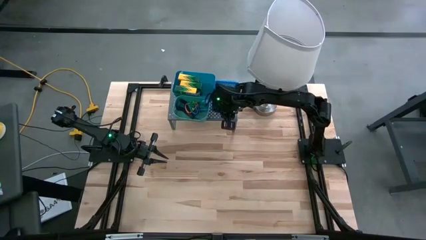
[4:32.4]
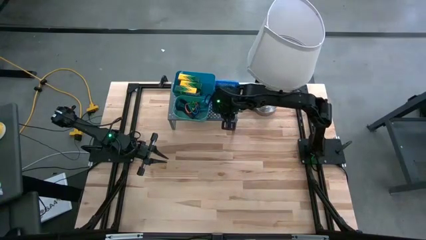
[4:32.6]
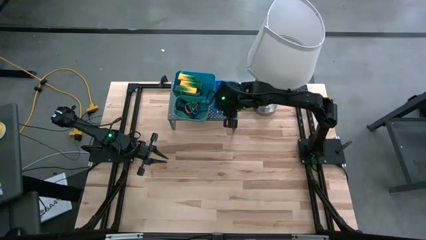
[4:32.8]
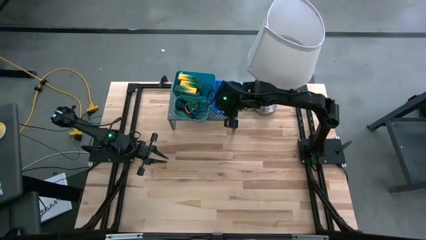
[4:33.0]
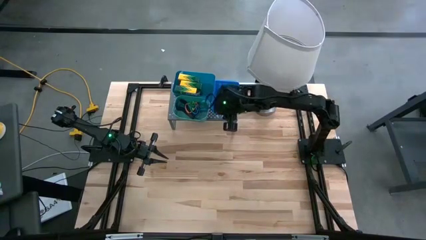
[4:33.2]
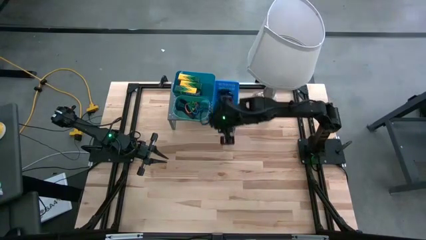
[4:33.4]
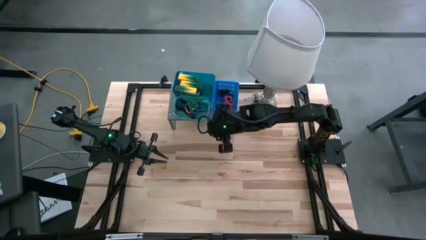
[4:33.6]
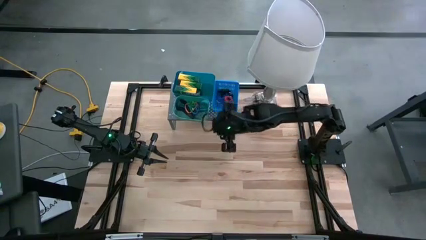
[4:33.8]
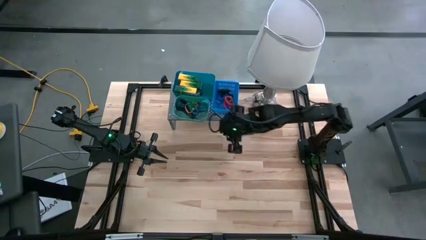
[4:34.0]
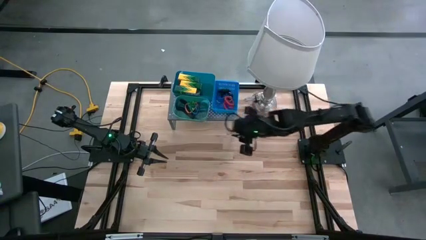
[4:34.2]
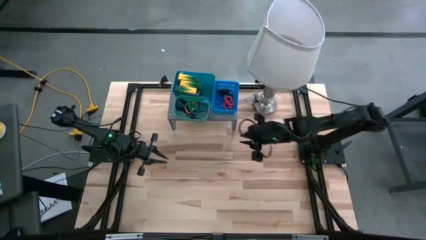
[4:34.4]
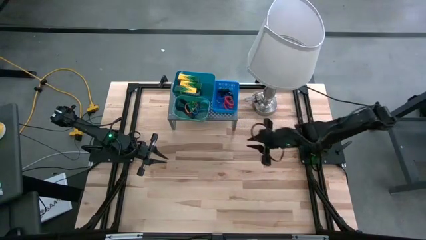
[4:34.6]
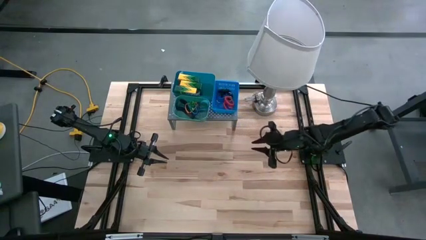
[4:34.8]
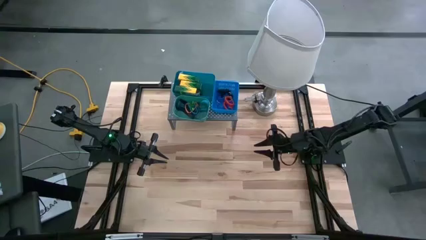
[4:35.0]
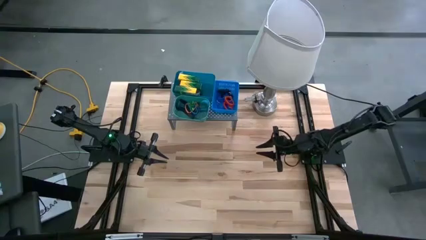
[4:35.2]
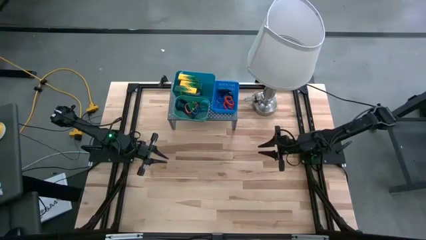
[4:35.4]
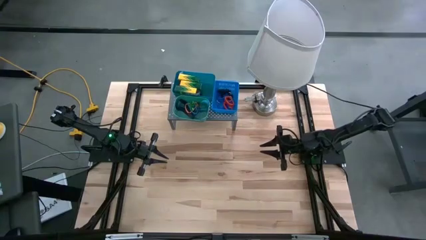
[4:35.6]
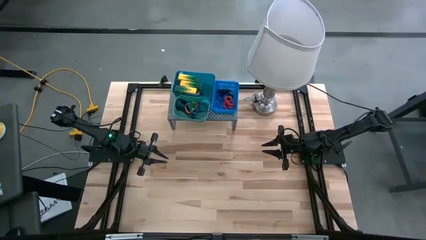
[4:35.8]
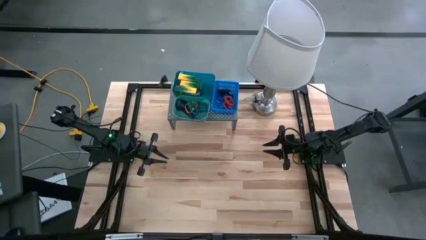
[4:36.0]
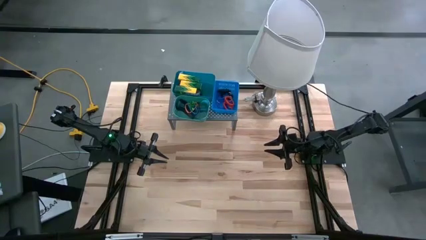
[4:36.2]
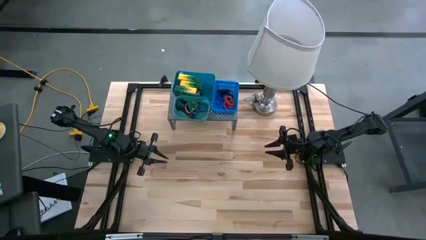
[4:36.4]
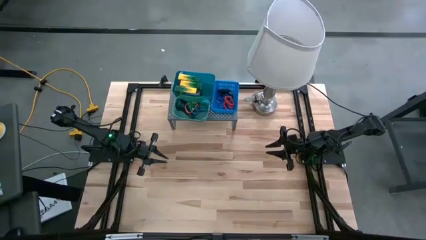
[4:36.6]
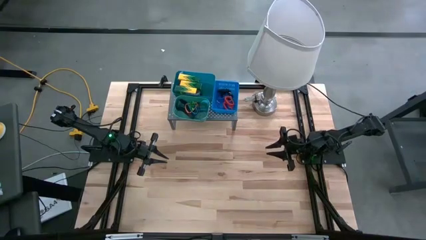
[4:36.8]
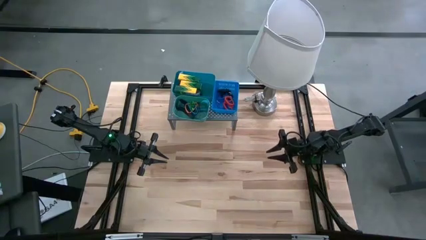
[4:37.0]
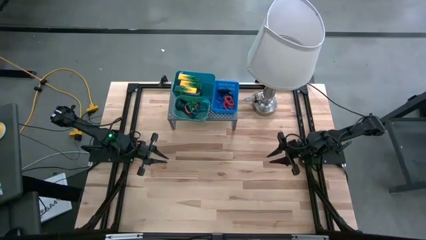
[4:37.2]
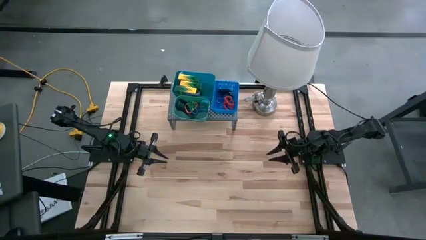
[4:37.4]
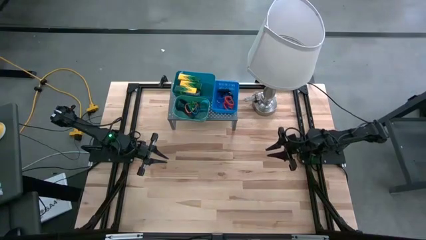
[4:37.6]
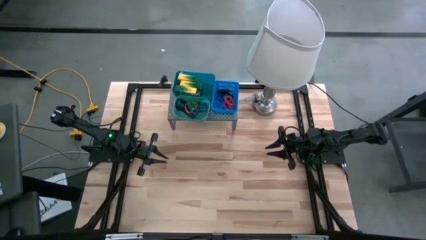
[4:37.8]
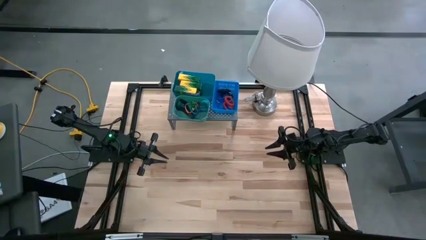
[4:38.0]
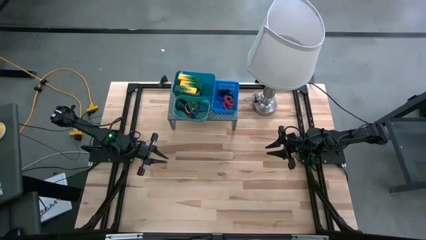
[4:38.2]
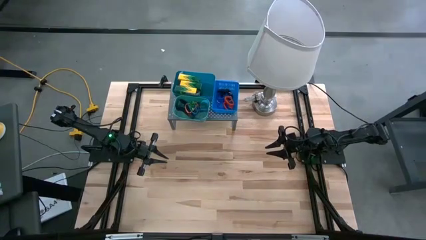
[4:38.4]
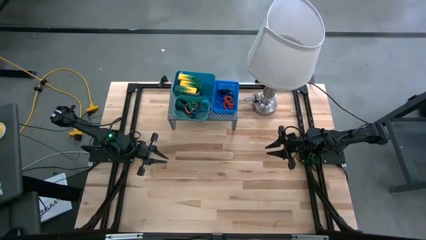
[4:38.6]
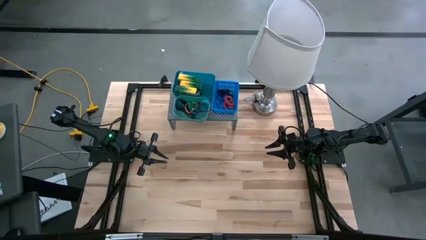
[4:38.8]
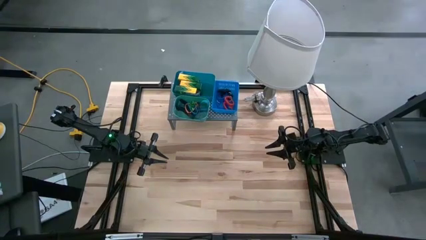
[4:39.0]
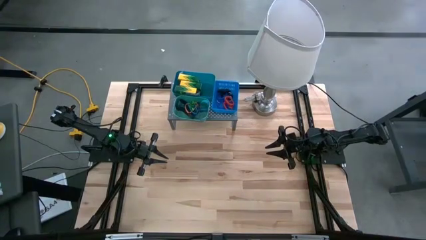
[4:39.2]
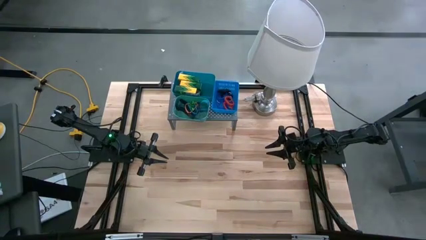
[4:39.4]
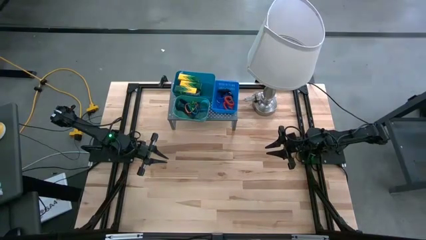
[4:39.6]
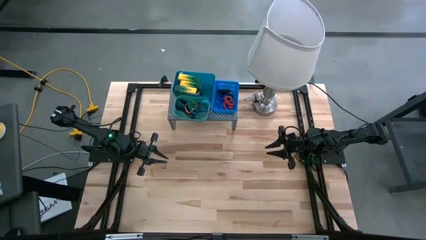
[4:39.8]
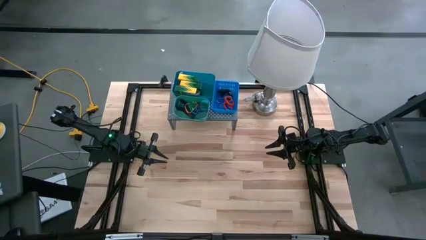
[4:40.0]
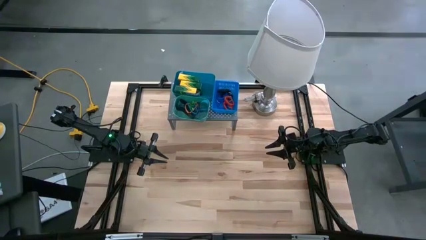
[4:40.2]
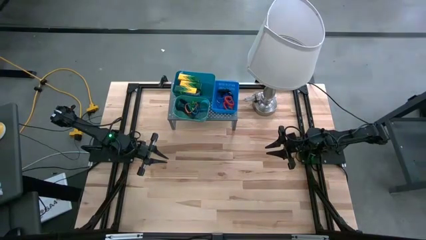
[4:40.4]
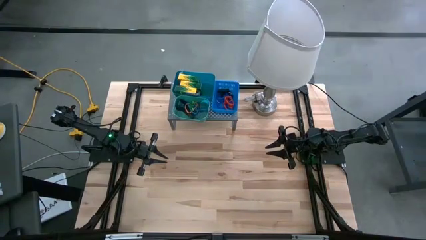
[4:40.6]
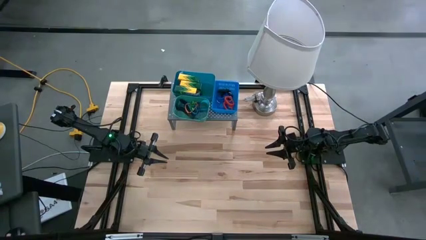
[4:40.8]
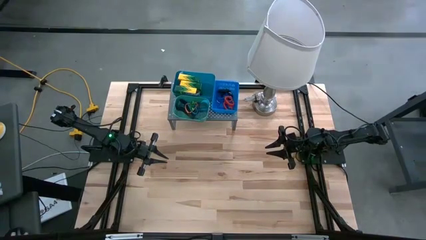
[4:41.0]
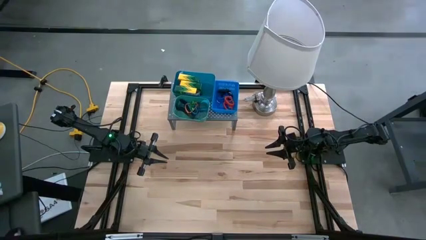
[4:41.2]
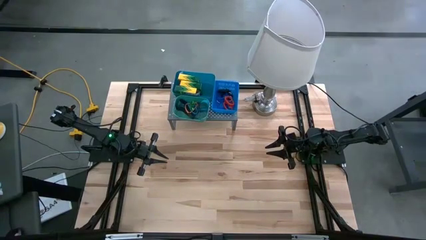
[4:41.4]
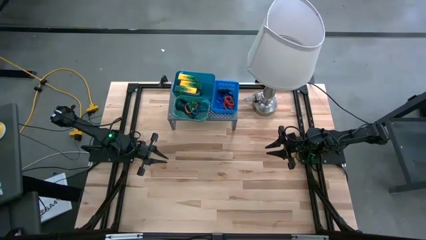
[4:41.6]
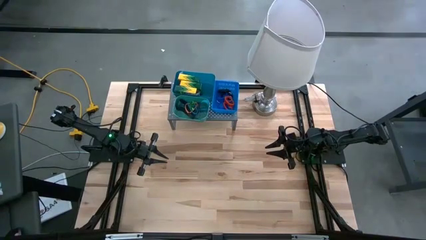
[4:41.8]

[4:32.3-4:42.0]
Task: Pick & Place Office Desk Supplies
Return to Home Position

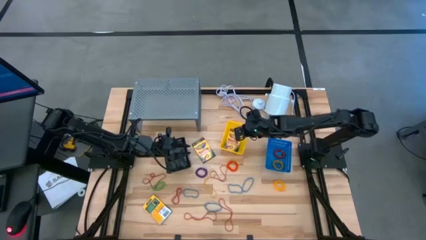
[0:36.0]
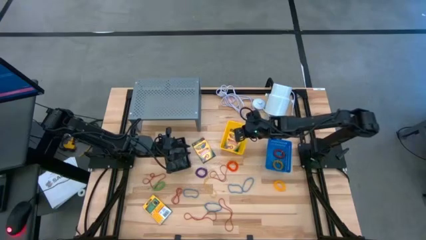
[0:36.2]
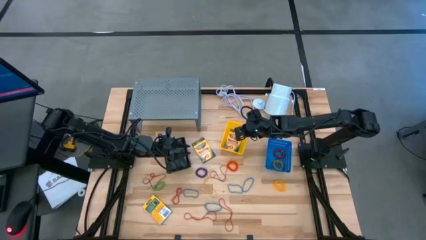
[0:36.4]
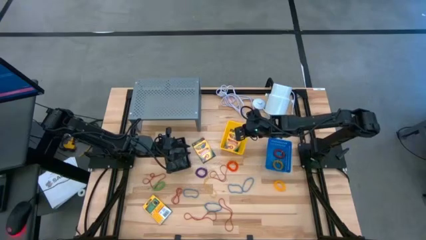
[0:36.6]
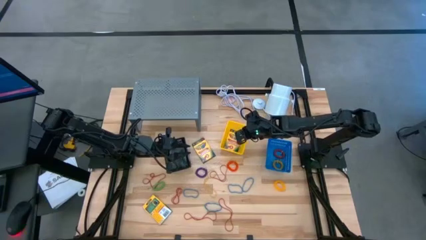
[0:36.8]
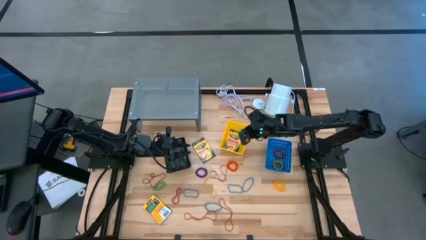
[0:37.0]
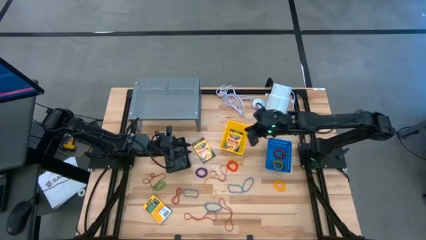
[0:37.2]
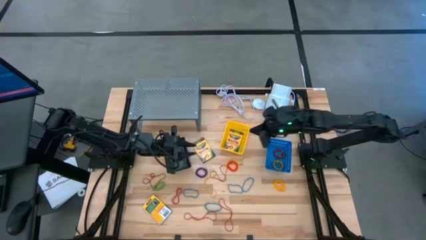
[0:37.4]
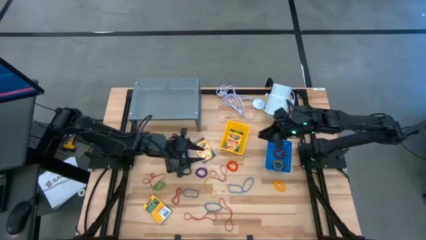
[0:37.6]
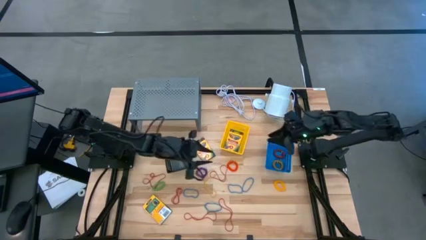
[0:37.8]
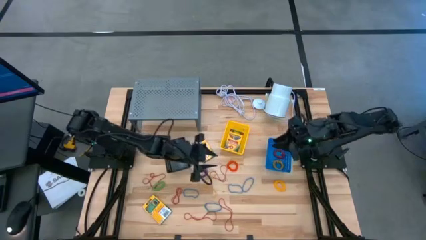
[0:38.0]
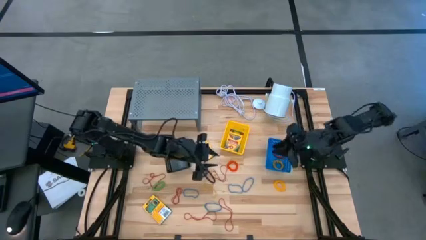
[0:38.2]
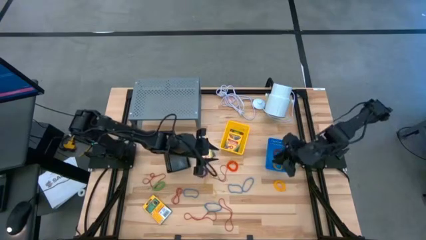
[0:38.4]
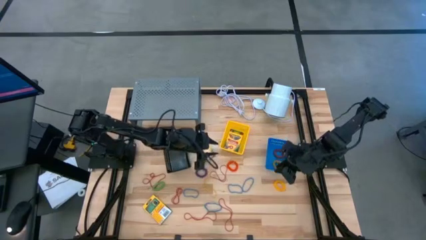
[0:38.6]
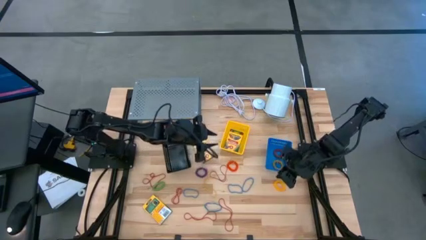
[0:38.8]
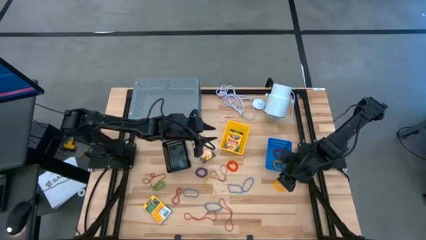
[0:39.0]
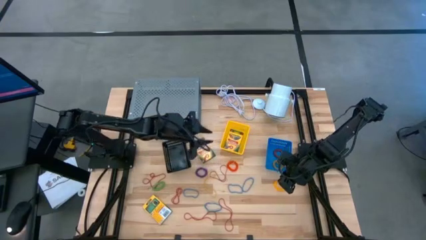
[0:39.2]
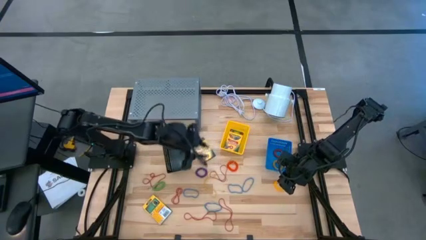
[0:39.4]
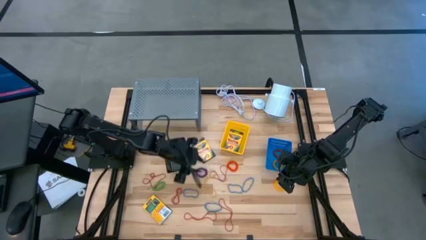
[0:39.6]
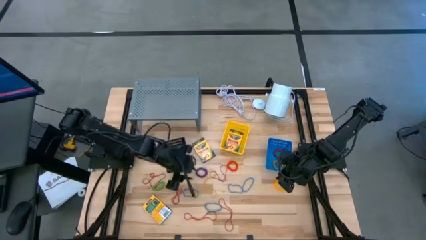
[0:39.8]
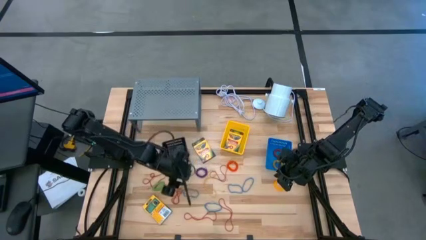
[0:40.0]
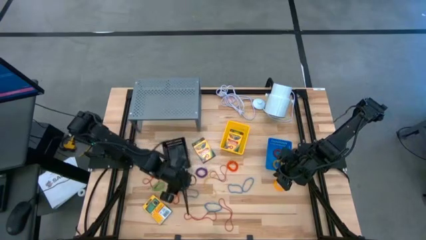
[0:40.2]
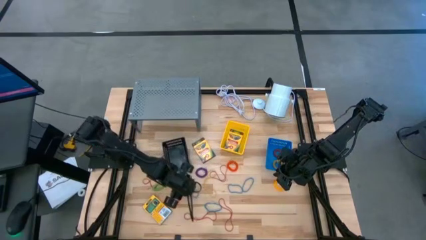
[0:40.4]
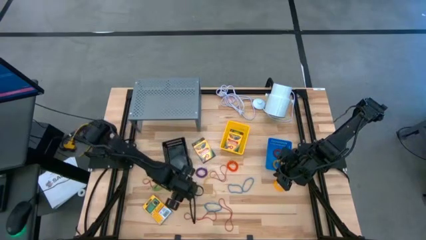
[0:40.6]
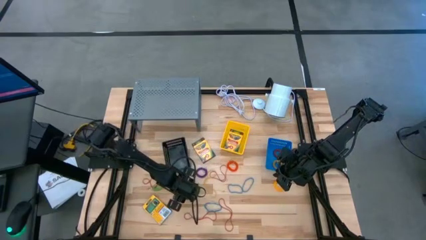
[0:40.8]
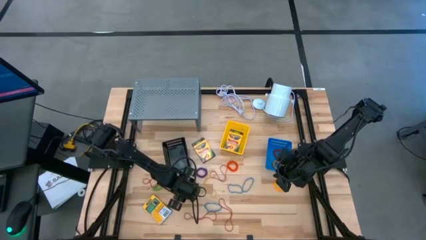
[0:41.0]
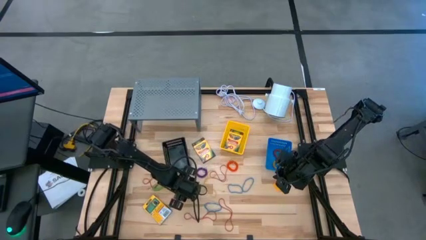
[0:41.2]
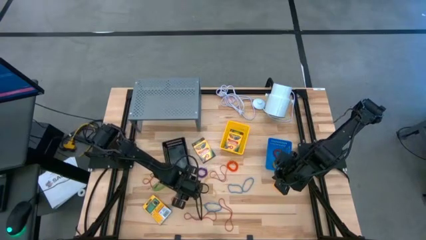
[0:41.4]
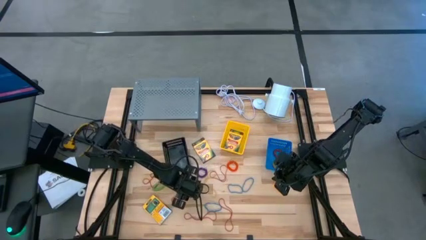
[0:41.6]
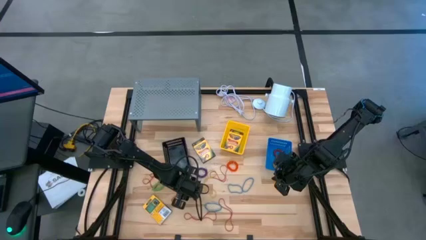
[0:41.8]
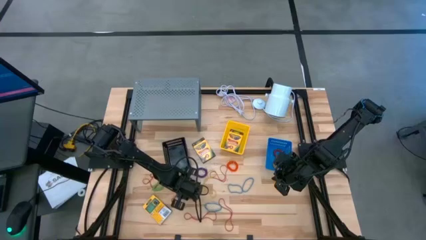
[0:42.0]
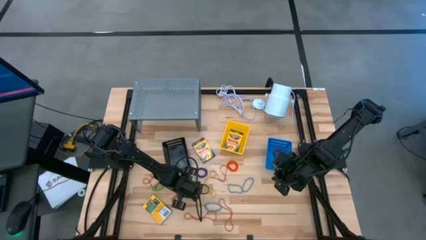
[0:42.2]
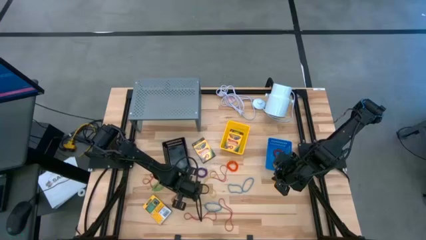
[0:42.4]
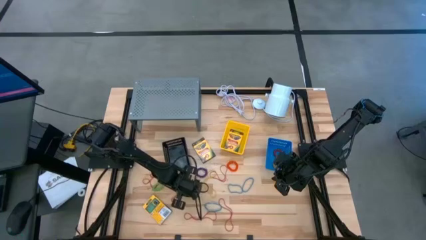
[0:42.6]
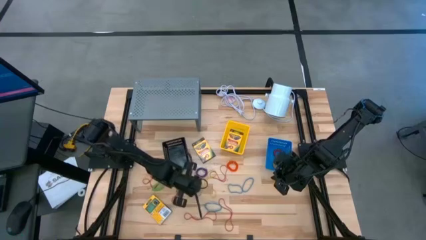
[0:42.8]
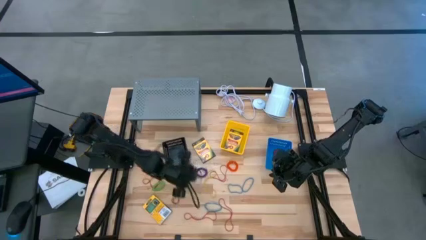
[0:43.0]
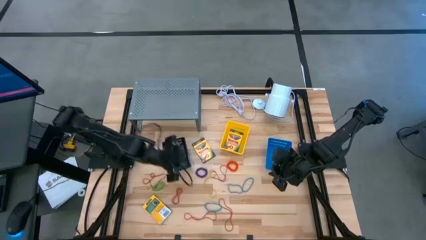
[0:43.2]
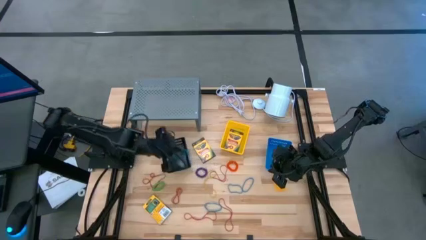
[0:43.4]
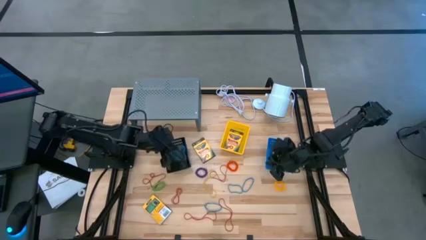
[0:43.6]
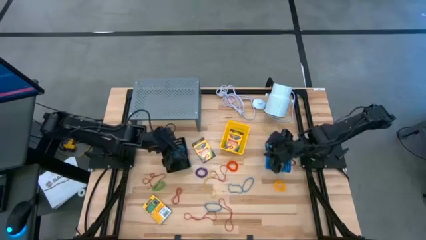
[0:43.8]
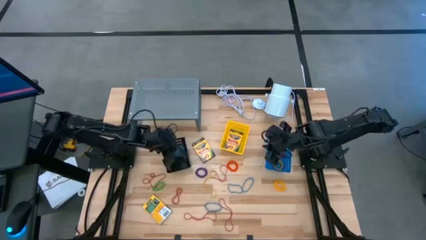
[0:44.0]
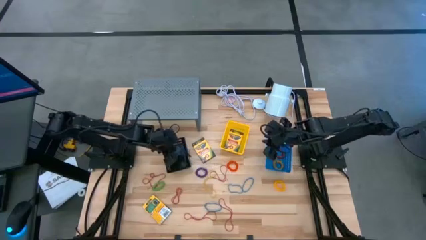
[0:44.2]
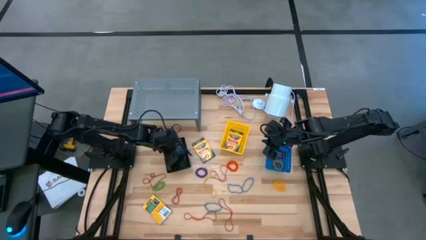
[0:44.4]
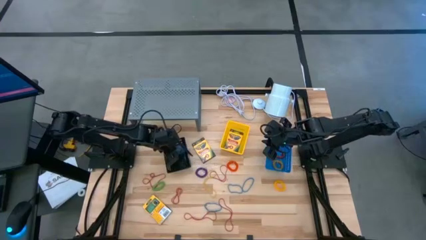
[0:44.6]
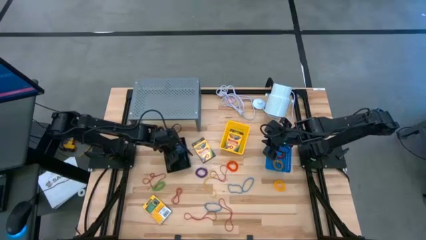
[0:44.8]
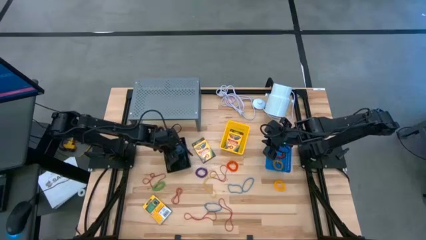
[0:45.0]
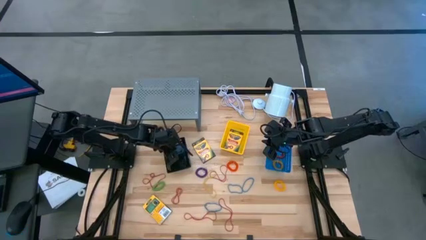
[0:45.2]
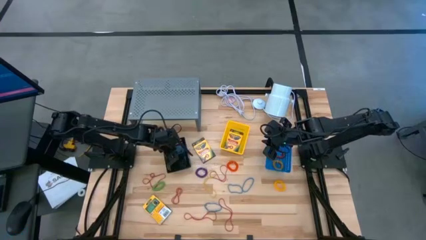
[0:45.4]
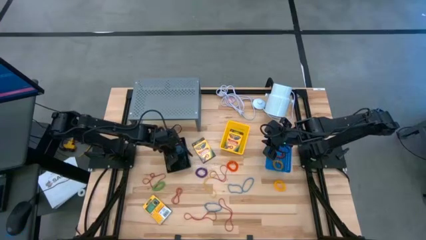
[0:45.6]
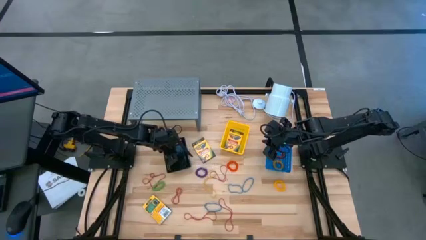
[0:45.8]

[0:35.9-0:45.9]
Task: Pick & Place Office Desk Supplies
Put the blue rubber band into the black bin
